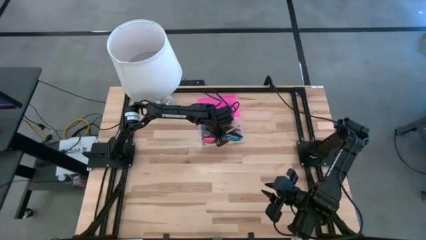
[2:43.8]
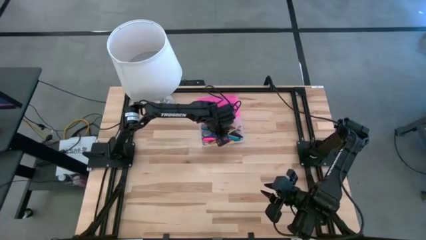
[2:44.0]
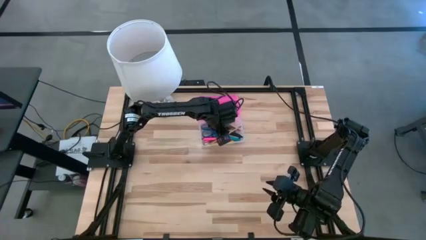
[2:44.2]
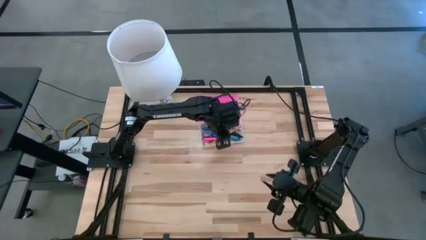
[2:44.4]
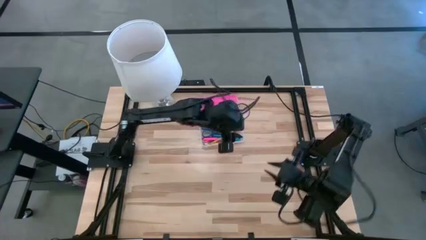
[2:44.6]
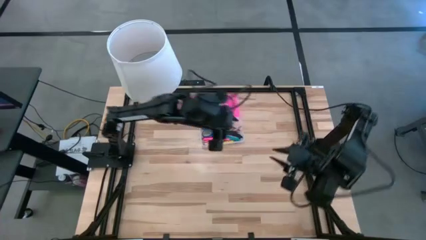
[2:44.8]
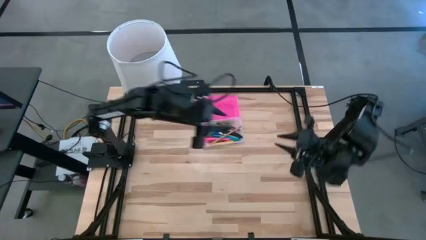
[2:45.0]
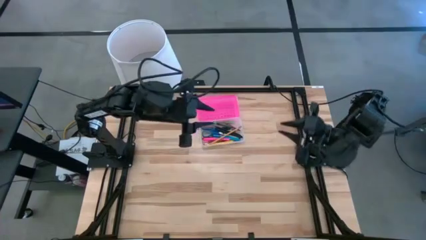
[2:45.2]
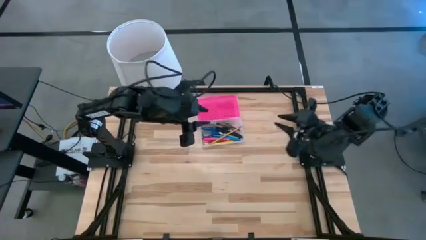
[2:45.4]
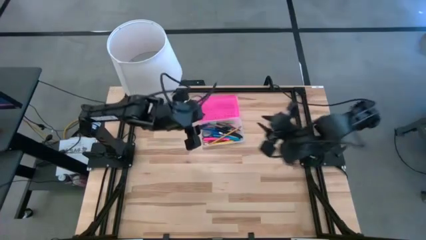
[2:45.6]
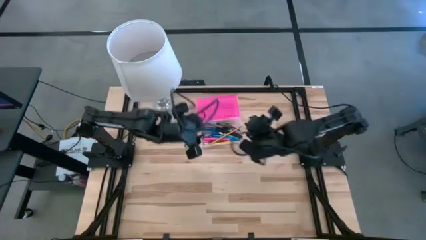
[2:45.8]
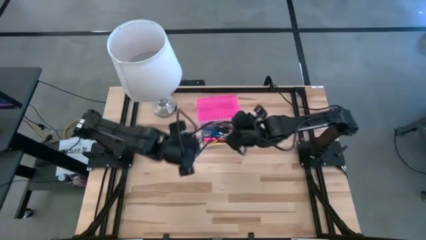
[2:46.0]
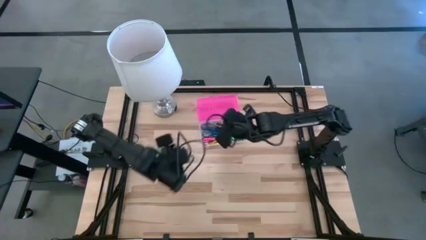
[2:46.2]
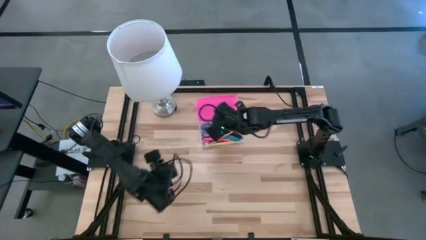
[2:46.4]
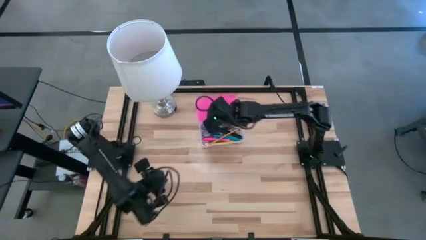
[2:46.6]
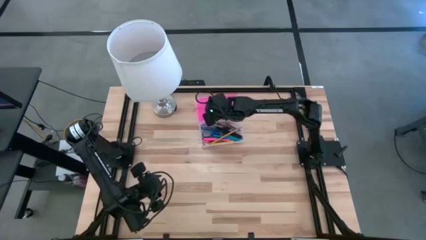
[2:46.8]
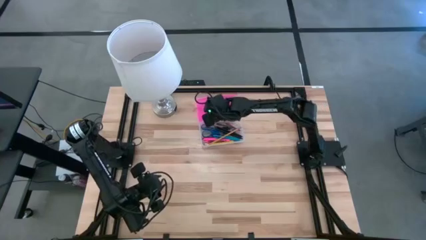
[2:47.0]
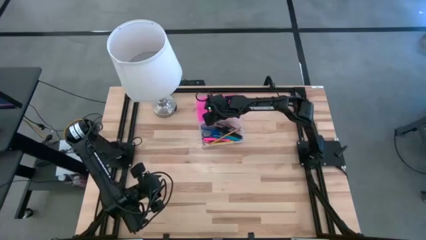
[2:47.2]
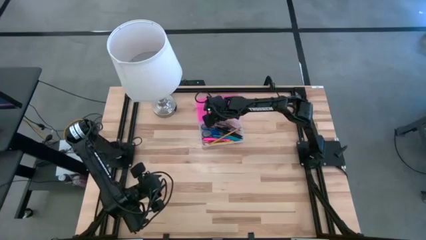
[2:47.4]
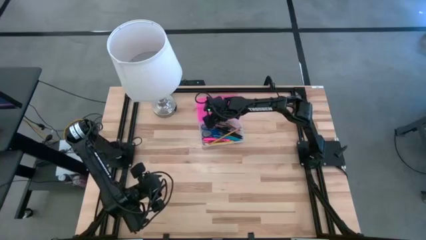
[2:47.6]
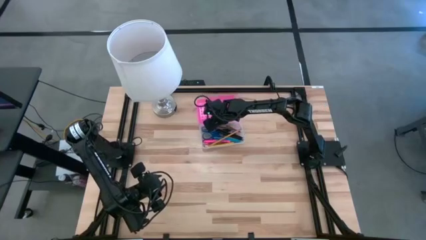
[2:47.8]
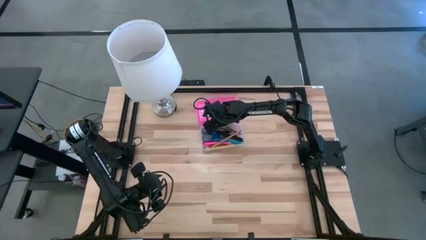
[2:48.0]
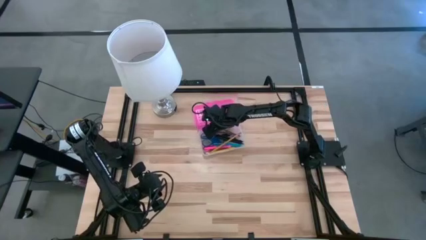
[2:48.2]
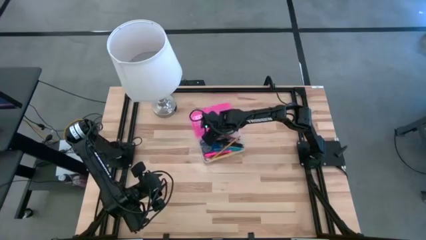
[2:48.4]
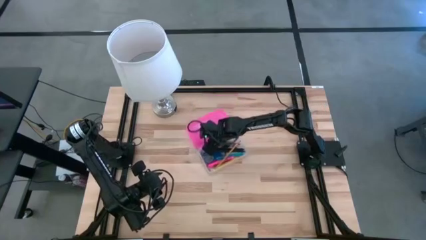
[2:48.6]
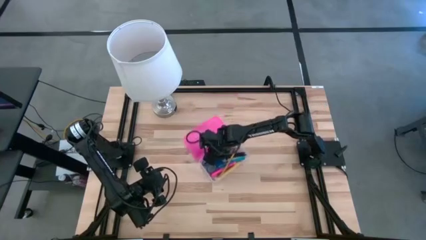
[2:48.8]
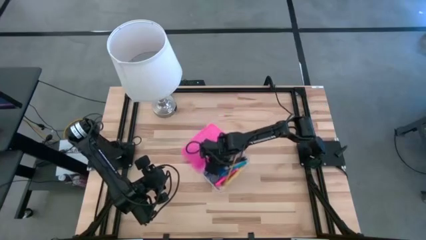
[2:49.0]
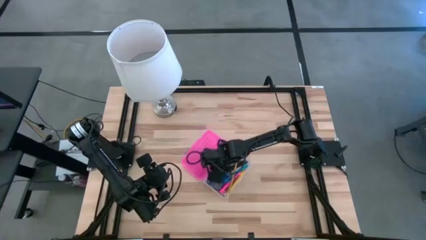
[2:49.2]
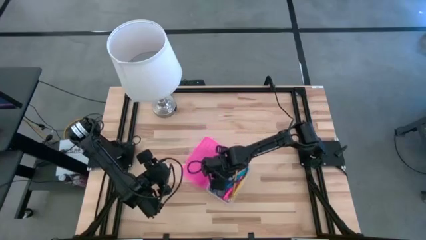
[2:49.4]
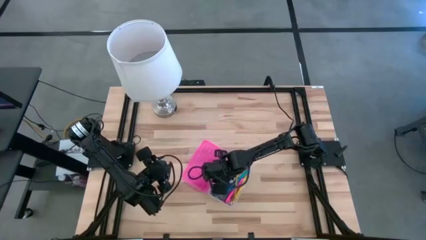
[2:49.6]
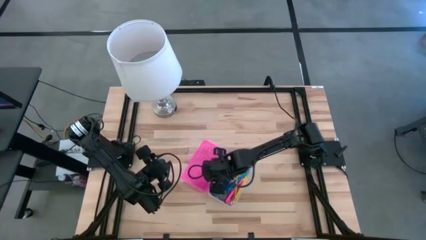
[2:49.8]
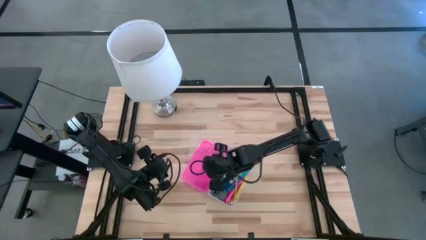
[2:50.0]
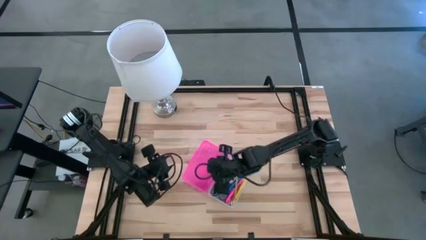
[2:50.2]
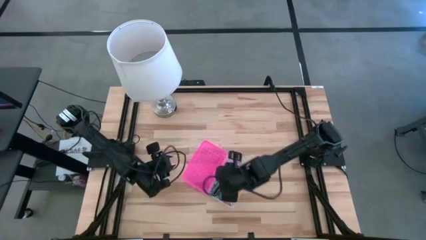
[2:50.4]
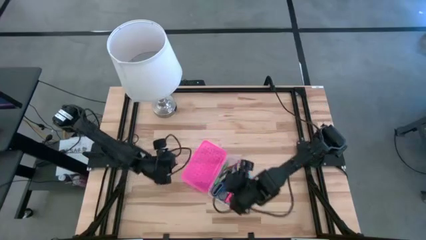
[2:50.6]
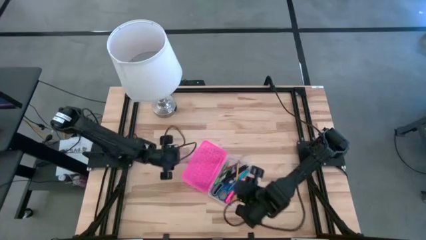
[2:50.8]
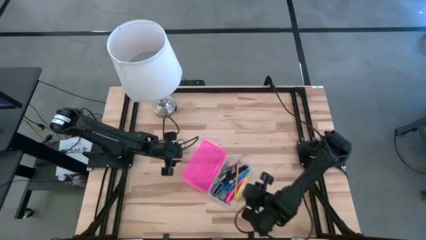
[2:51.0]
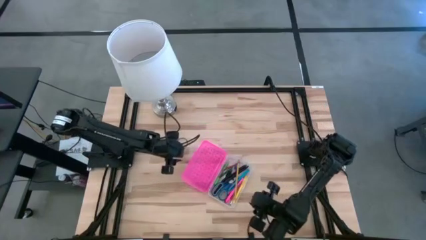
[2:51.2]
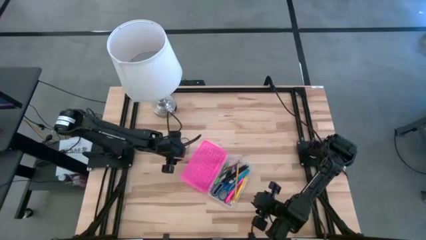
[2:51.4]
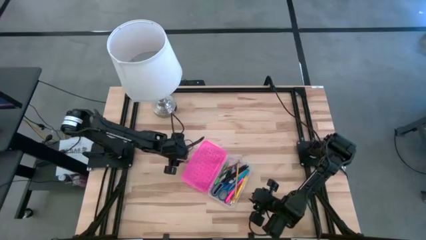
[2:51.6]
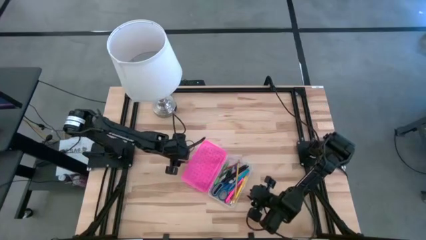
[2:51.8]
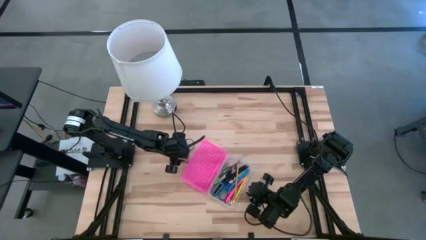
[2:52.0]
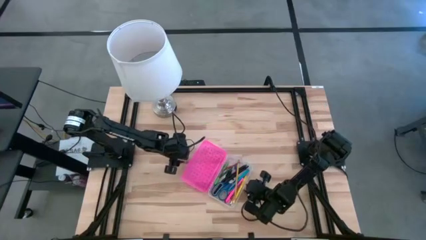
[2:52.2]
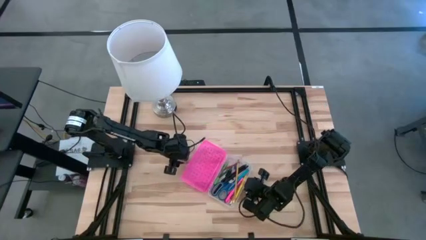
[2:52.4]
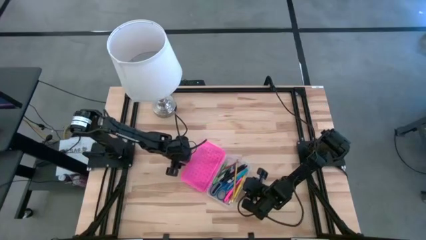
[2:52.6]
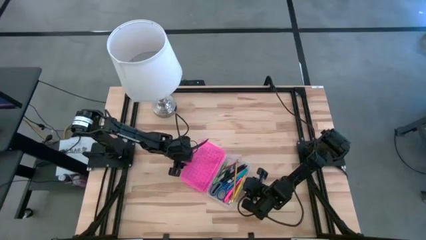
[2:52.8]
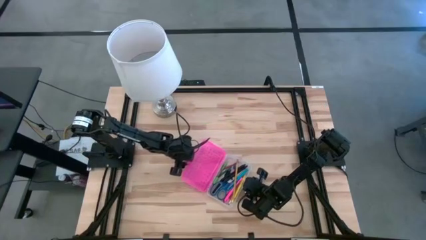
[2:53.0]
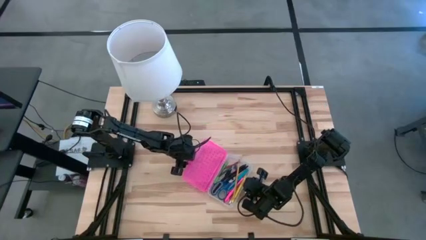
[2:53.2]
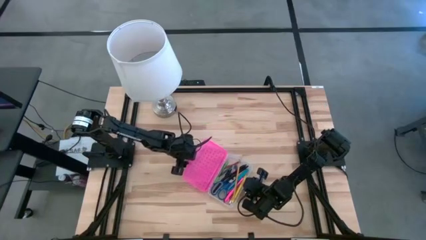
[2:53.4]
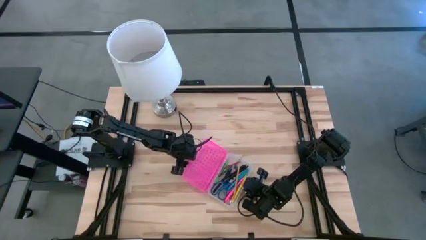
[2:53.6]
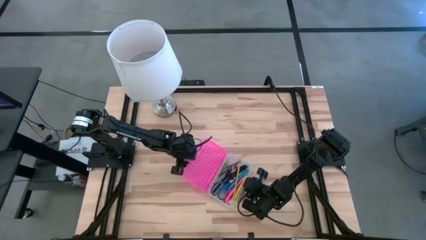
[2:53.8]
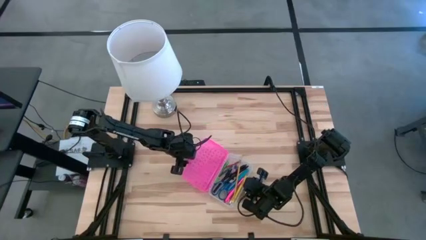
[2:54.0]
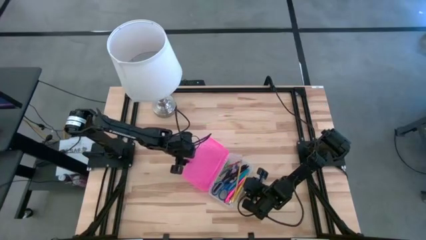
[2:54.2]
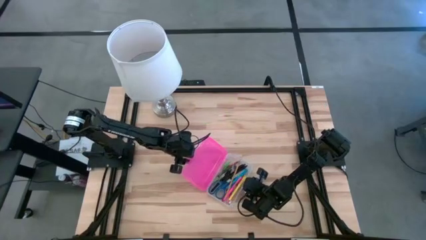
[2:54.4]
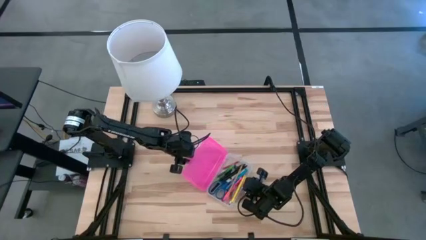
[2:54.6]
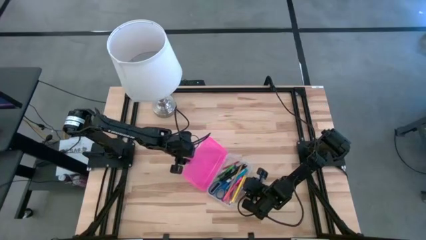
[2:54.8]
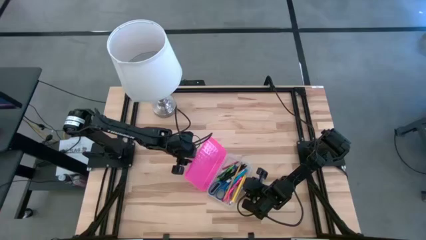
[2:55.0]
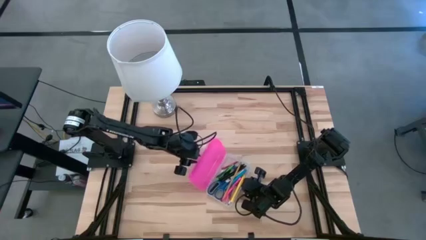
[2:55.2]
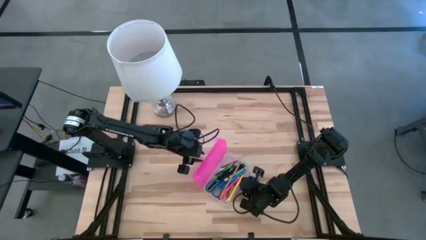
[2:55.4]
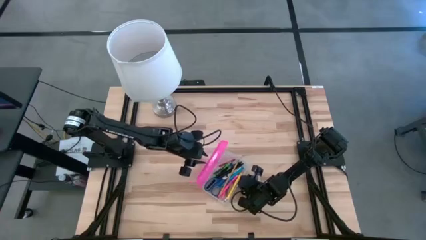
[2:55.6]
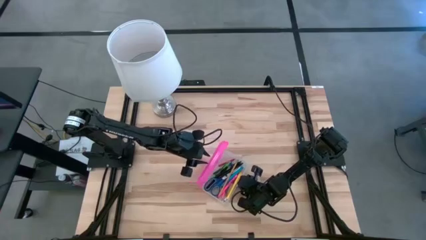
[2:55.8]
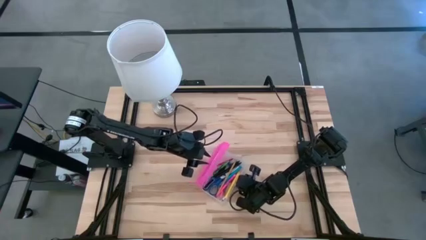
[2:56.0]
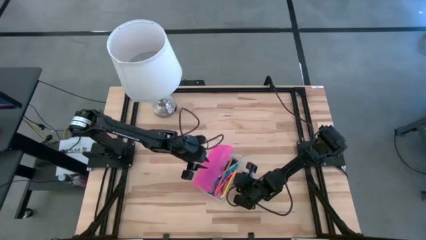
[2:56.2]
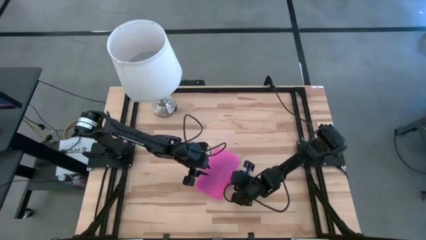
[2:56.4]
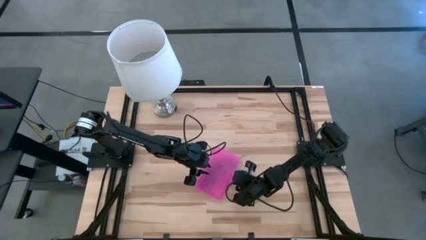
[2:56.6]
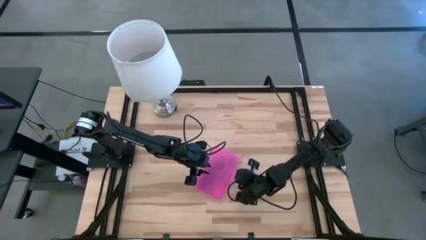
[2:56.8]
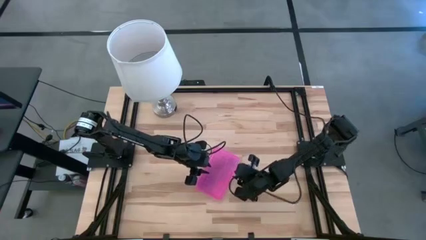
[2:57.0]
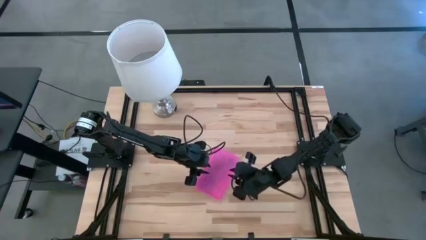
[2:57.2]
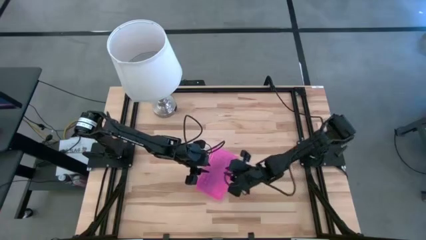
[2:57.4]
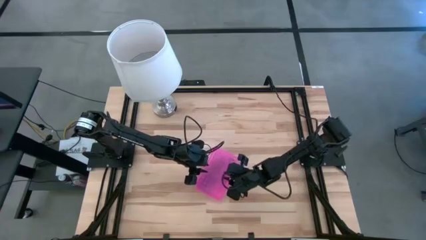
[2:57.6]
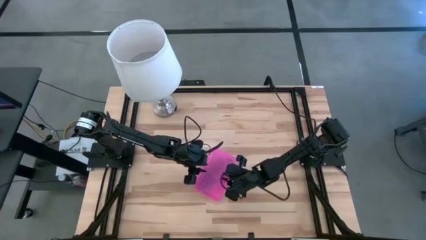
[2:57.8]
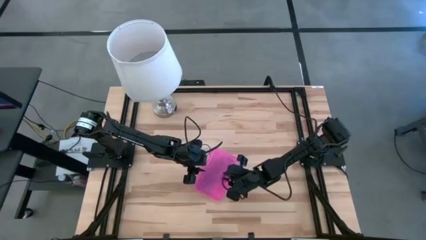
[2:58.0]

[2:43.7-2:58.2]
Task: Pick & place school supplies into a supply box
Close the pink supply box
